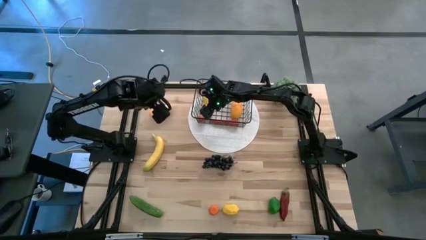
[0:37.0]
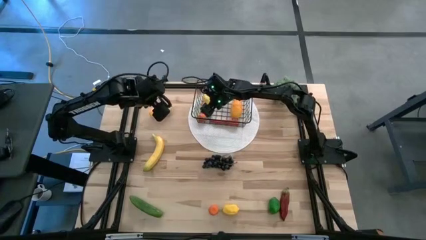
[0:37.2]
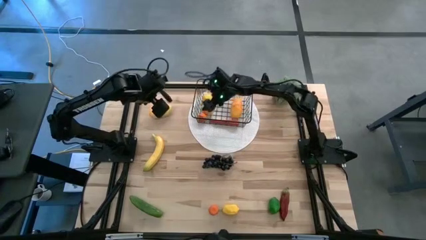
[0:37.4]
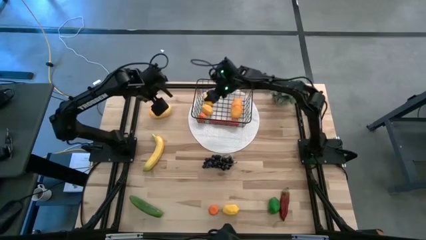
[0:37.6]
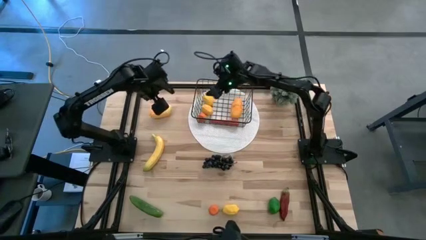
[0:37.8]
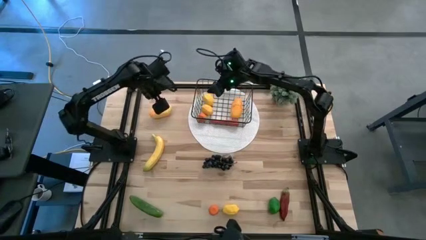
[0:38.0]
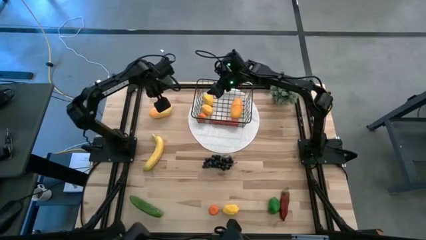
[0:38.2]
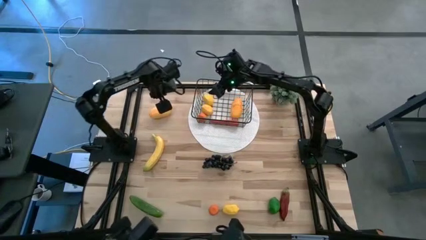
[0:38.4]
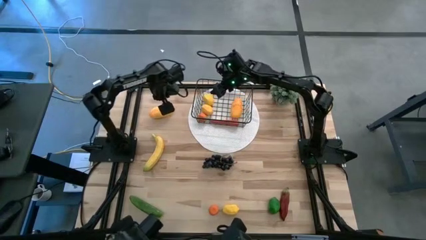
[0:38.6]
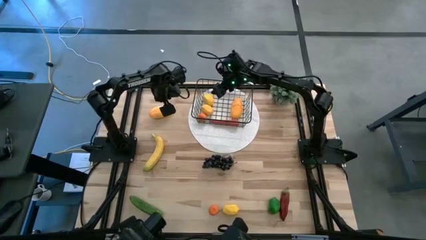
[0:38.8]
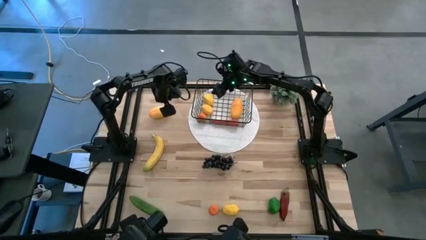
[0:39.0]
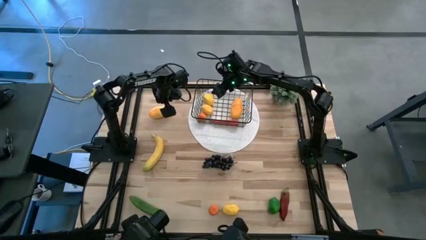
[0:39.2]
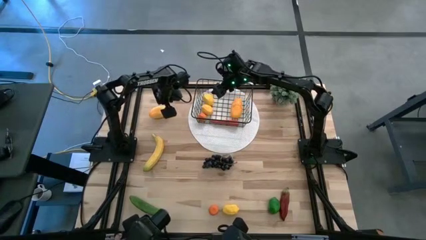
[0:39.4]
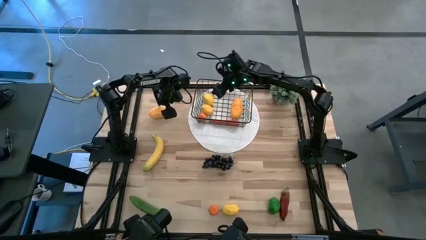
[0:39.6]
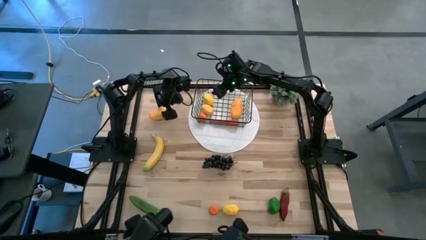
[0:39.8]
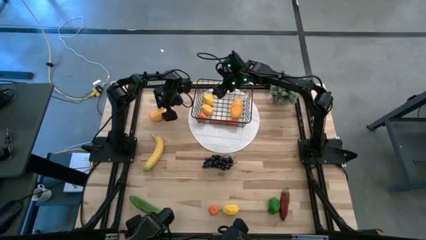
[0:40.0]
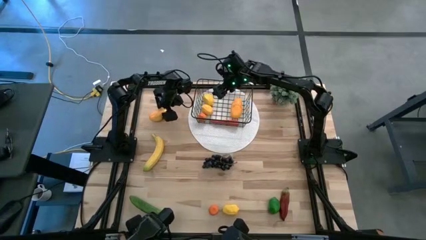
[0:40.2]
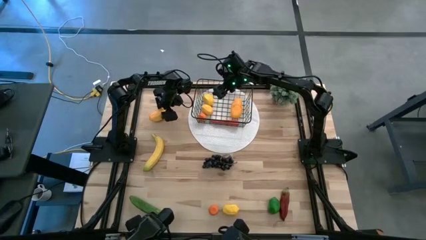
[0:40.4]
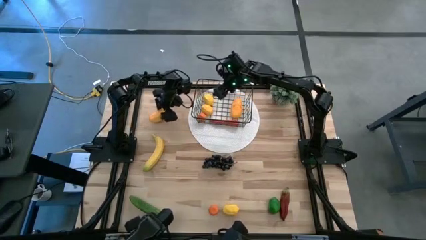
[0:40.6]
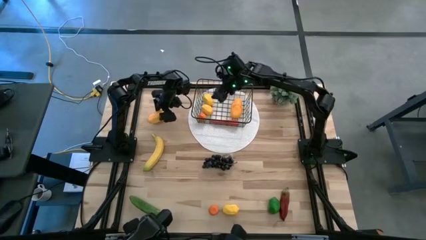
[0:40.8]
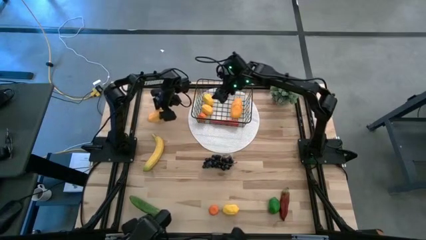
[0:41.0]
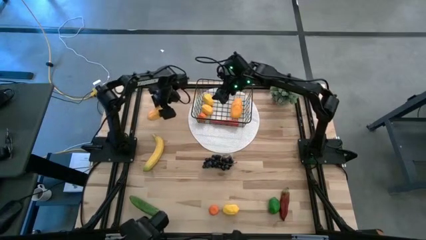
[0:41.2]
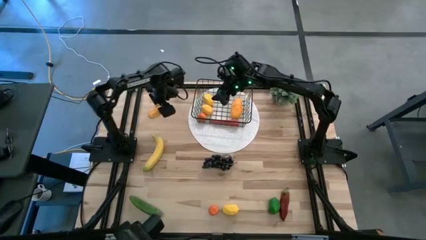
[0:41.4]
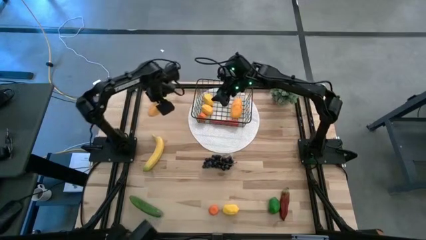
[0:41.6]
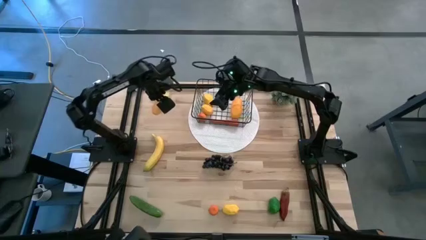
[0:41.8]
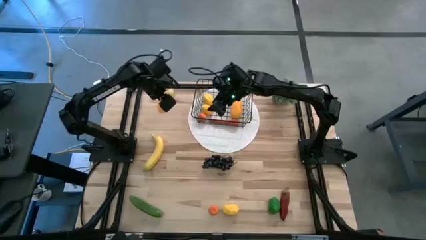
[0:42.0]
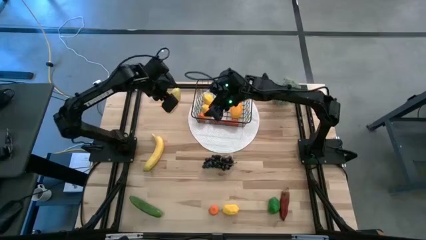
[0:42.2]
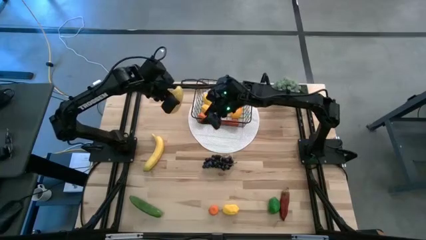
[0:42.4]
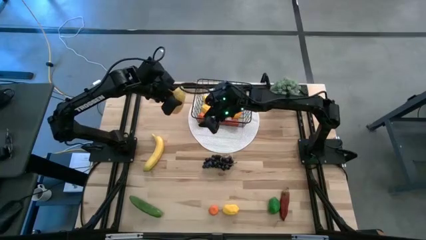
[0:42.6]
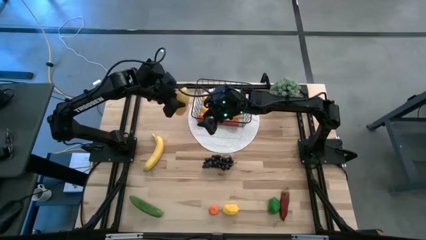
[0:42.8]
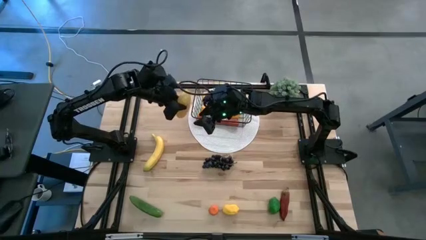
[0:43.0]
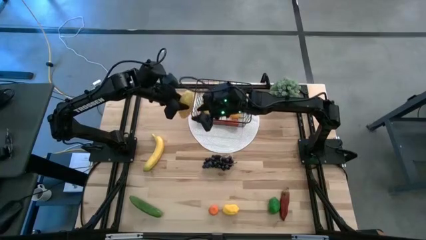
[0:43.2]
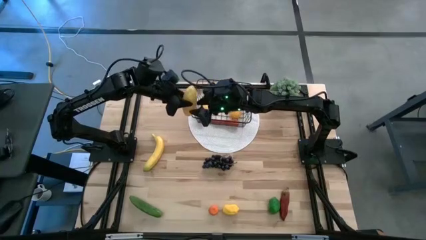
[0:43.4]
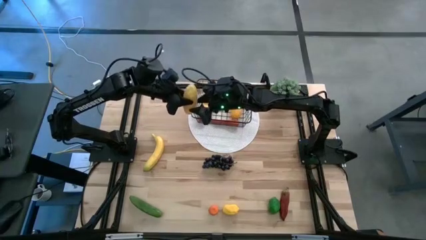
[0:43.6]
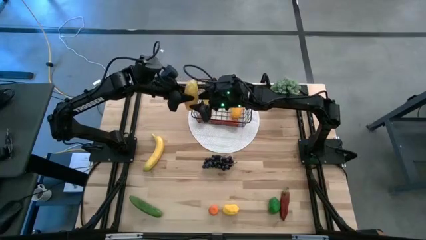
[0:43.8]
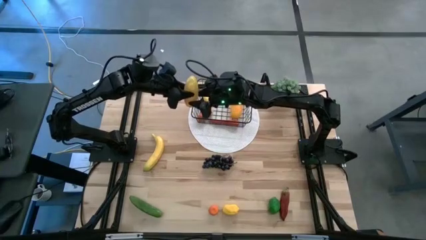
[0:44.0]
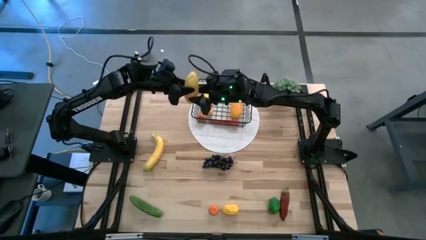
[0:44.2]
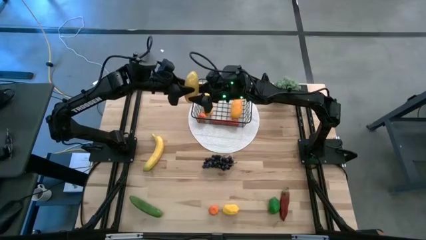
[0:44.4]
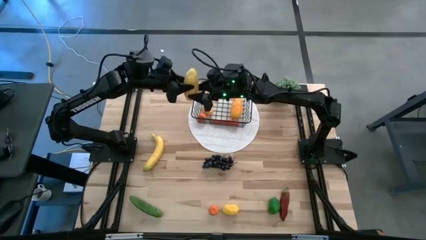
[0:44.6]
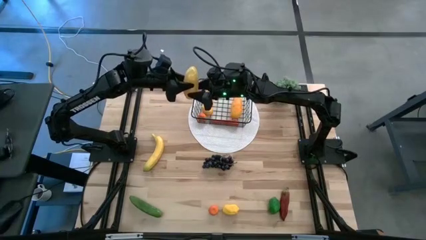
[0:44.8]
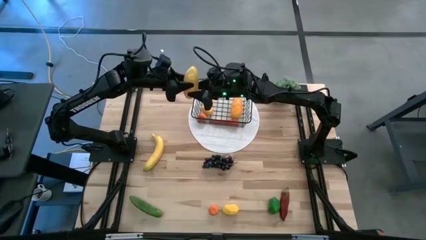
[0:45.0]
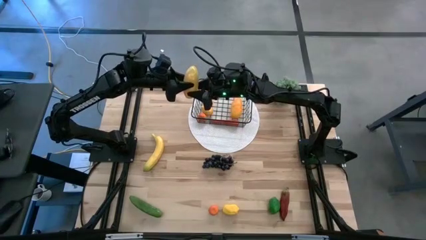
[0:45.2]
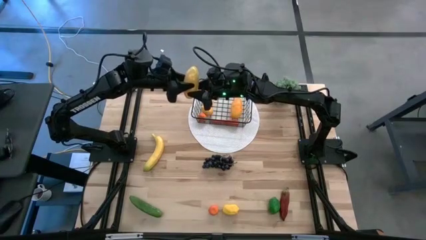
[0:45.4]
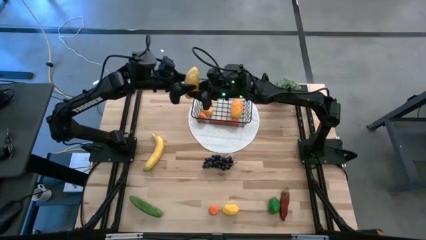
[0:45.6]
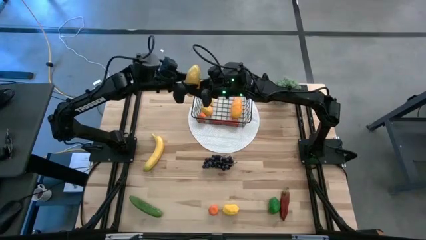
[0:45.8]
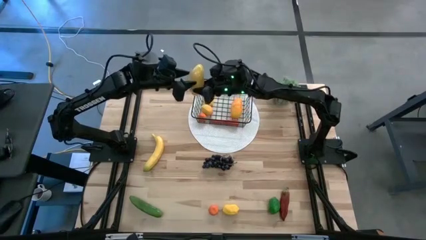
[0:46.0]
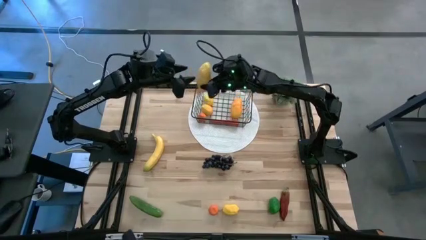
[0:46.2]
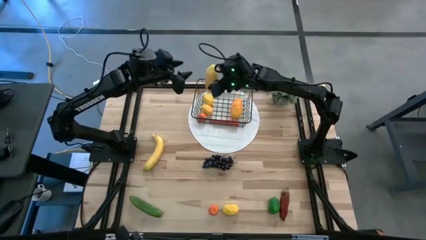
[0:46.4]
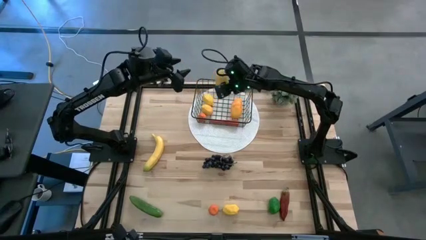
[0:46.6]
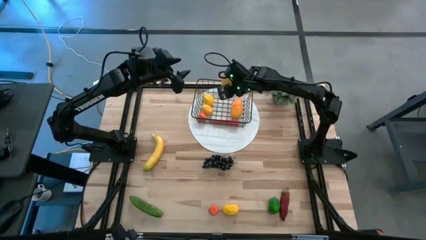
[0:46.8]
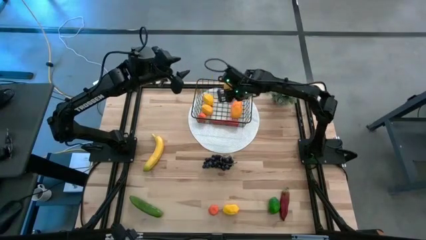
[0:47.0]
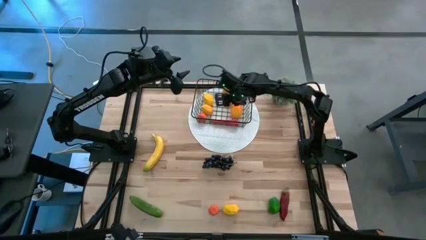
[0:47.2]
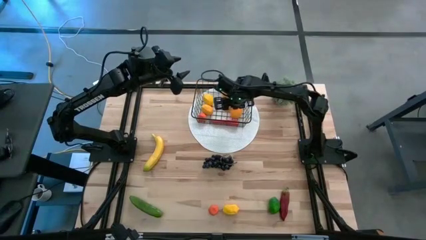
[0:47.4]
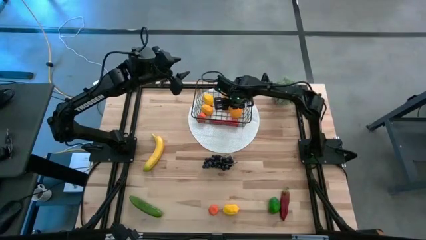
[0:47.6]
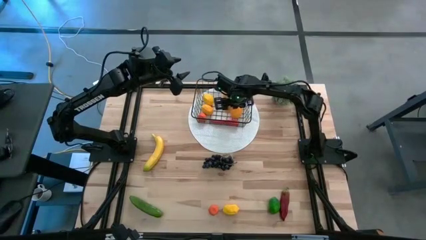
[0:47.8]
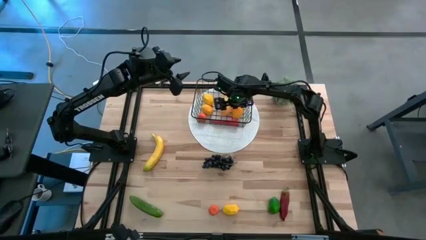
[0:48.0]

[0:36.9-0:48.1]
Task: Build produce basket
Put the mango into mesh basket
